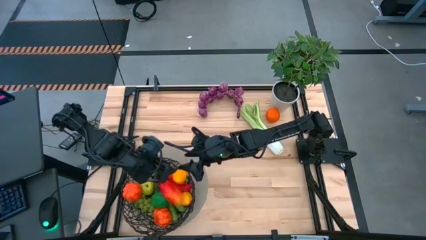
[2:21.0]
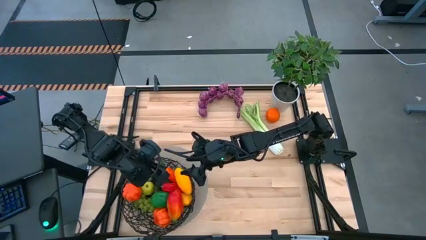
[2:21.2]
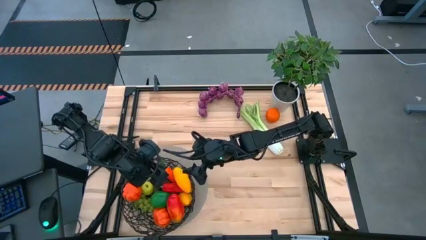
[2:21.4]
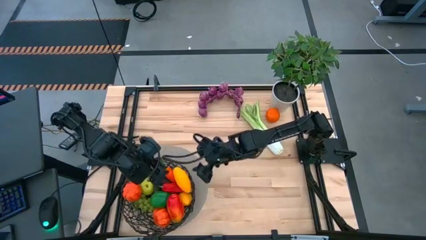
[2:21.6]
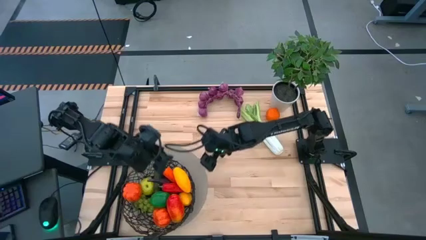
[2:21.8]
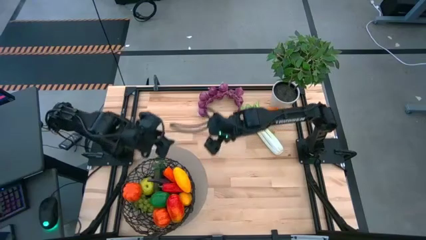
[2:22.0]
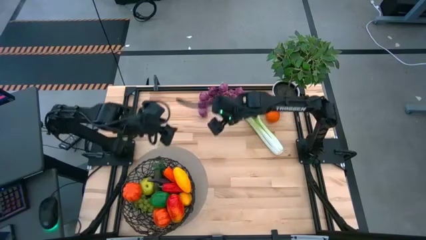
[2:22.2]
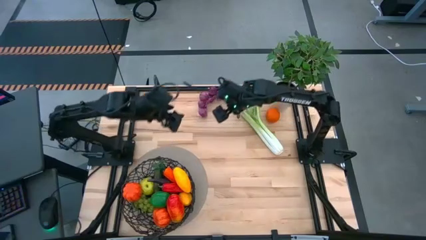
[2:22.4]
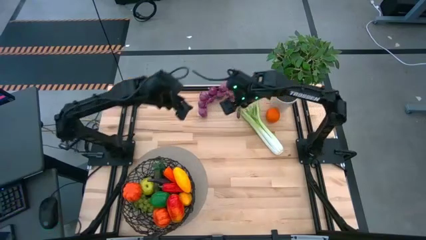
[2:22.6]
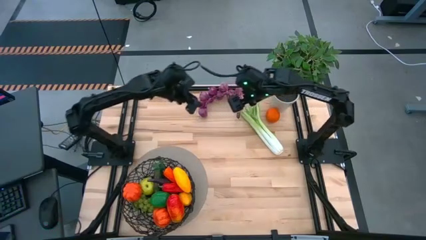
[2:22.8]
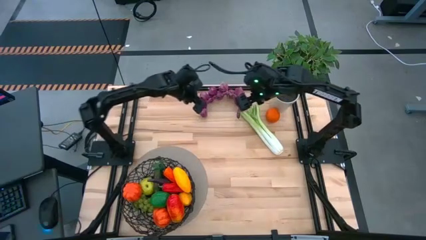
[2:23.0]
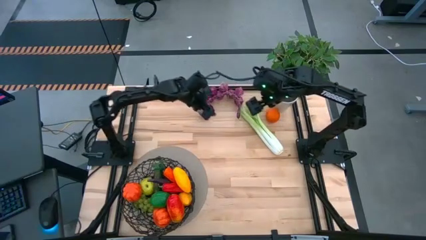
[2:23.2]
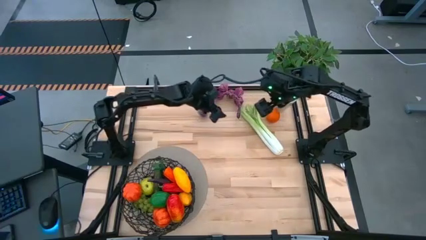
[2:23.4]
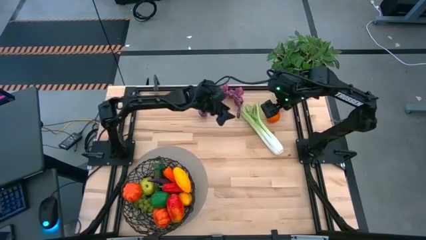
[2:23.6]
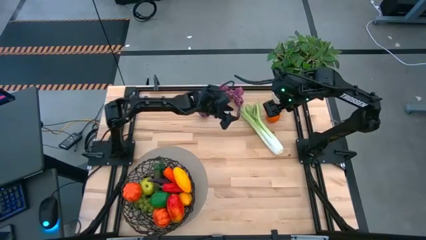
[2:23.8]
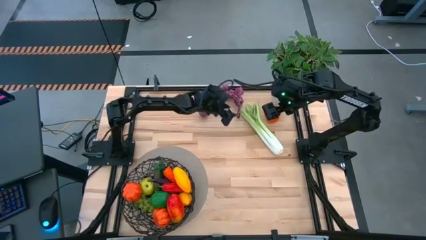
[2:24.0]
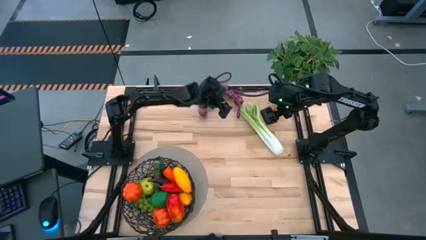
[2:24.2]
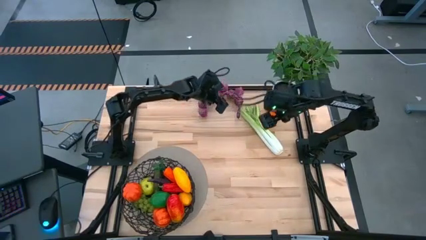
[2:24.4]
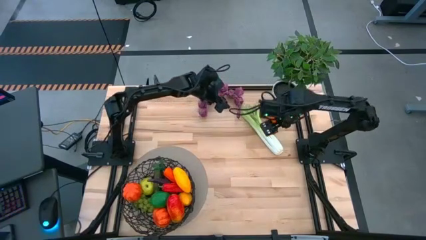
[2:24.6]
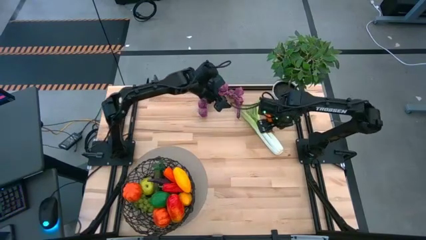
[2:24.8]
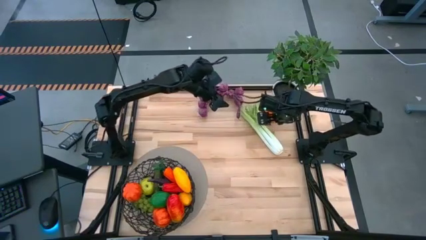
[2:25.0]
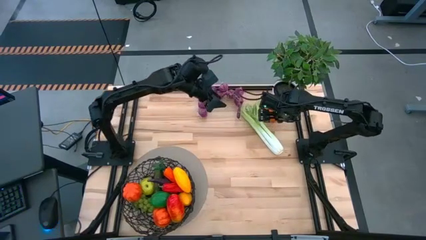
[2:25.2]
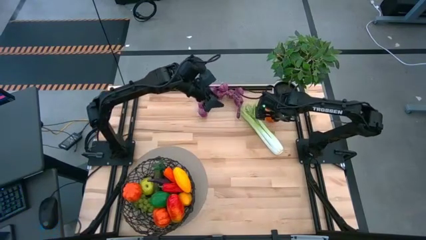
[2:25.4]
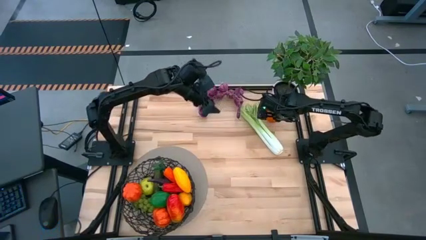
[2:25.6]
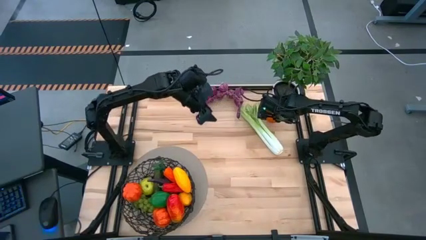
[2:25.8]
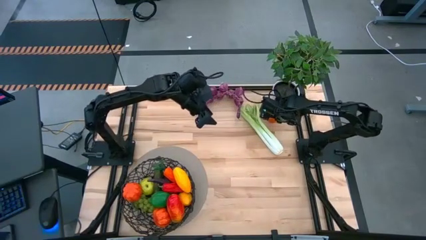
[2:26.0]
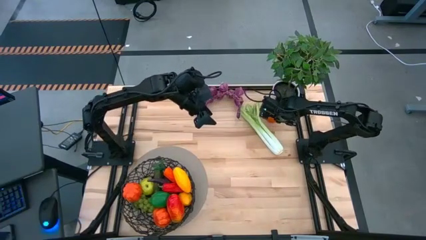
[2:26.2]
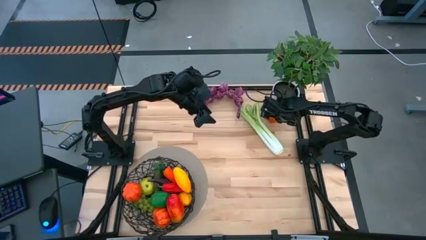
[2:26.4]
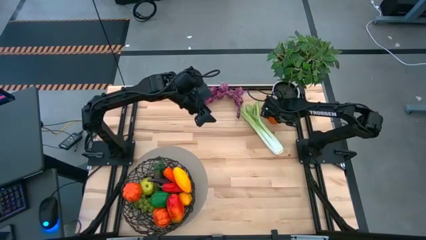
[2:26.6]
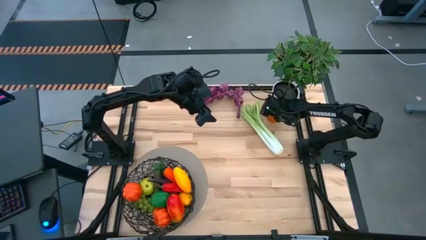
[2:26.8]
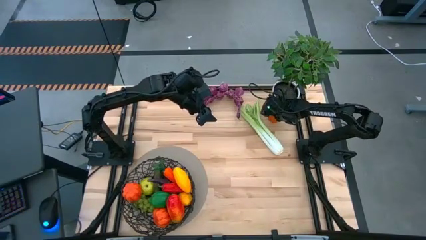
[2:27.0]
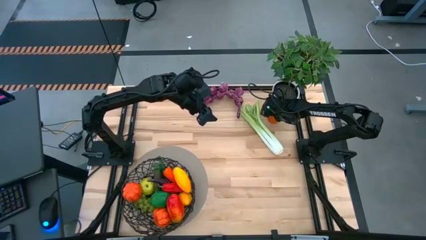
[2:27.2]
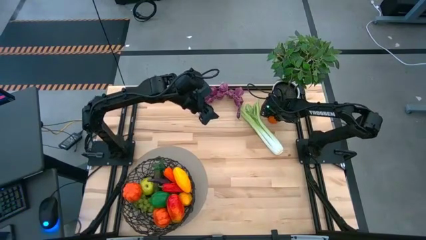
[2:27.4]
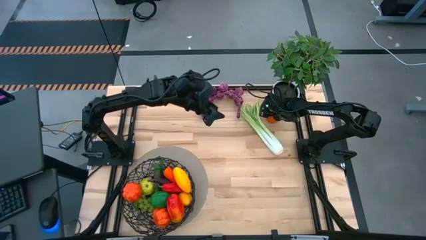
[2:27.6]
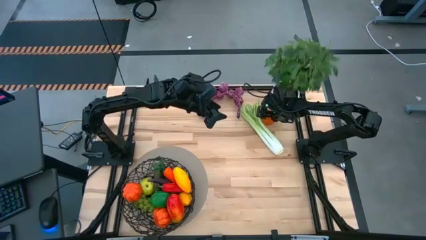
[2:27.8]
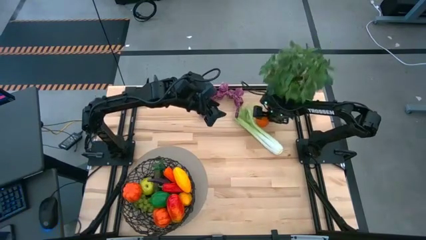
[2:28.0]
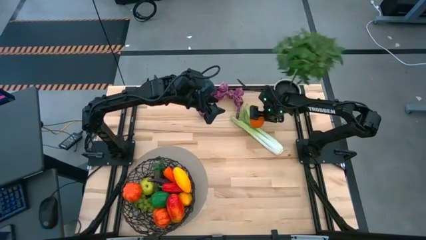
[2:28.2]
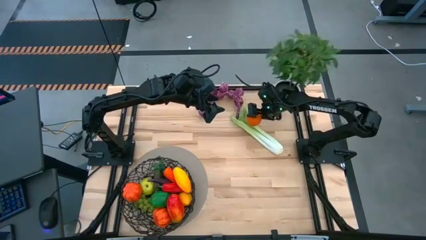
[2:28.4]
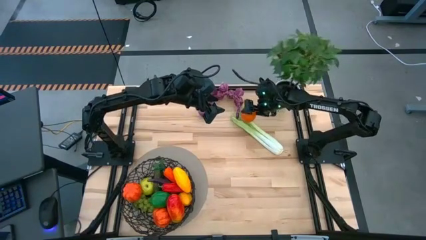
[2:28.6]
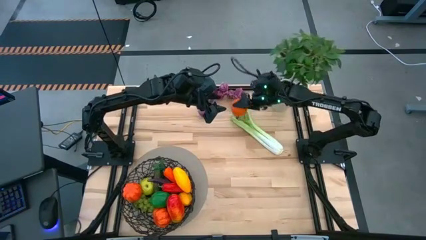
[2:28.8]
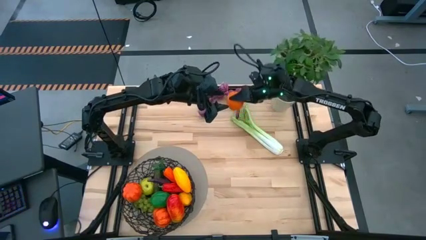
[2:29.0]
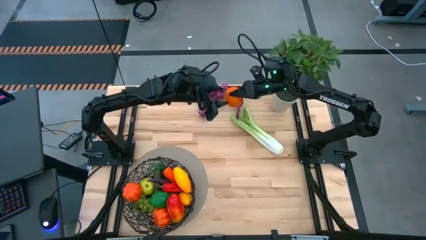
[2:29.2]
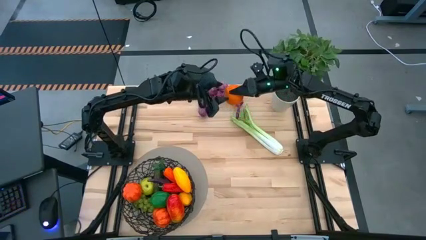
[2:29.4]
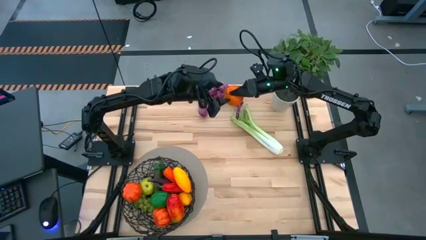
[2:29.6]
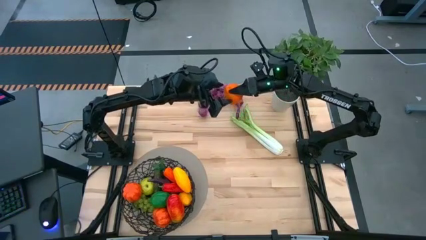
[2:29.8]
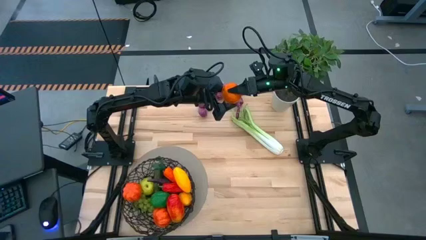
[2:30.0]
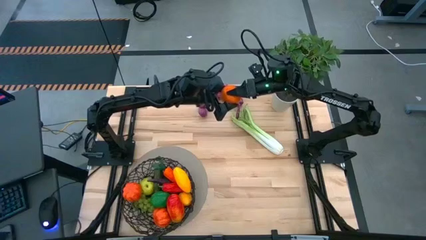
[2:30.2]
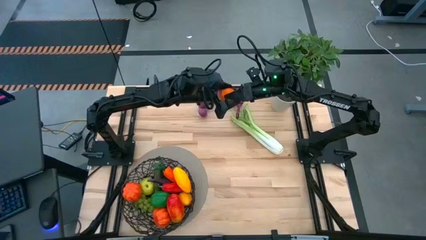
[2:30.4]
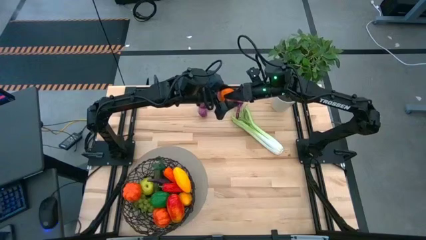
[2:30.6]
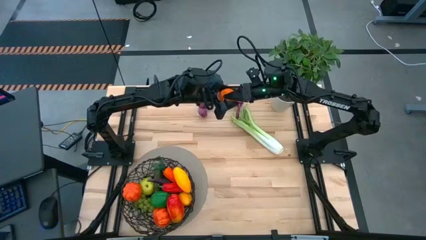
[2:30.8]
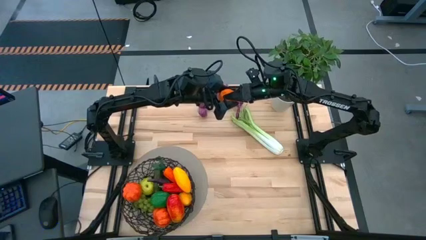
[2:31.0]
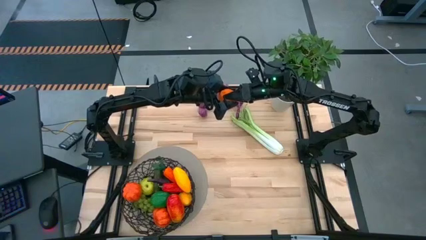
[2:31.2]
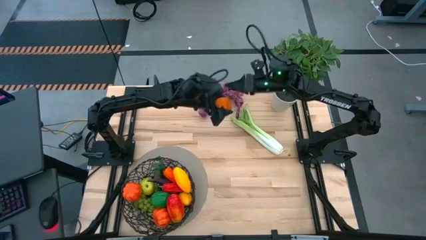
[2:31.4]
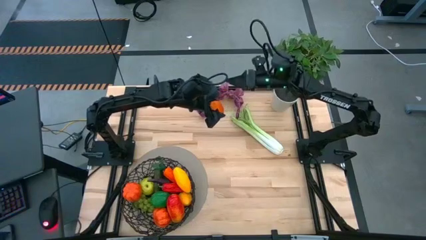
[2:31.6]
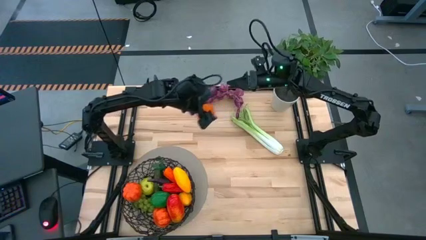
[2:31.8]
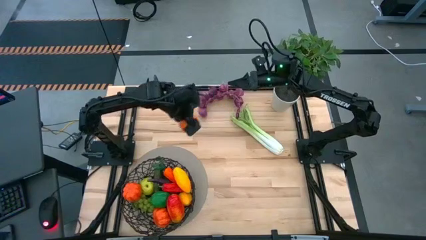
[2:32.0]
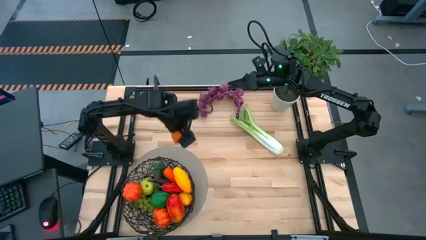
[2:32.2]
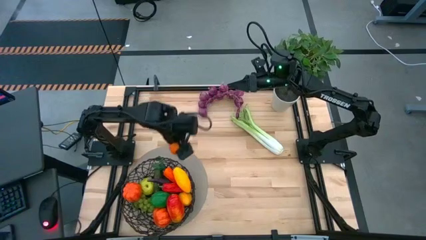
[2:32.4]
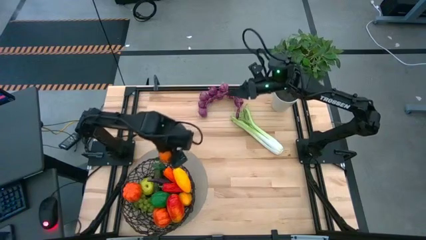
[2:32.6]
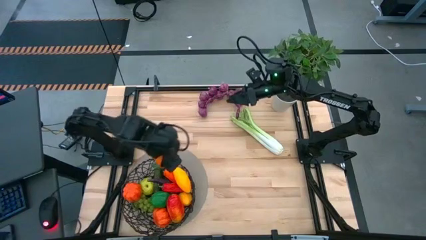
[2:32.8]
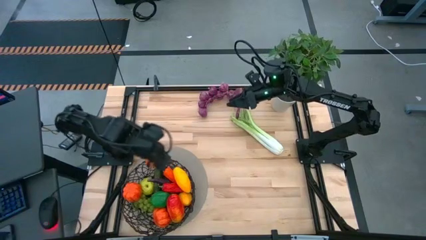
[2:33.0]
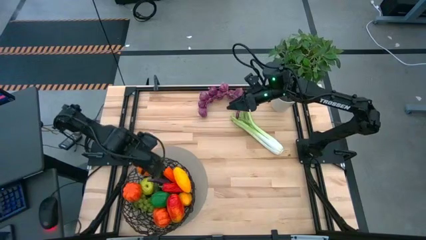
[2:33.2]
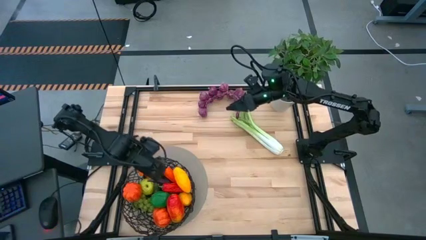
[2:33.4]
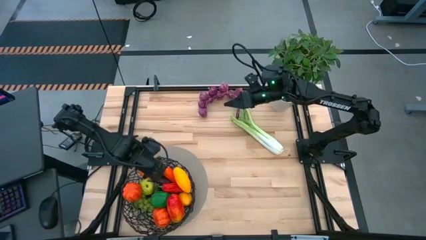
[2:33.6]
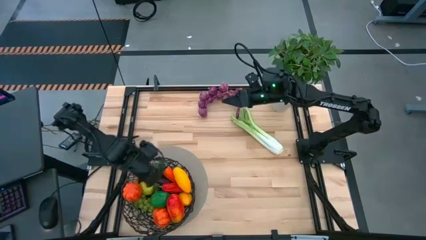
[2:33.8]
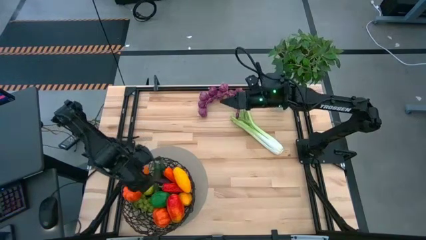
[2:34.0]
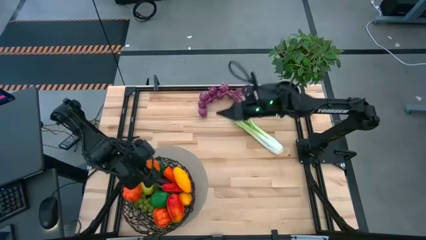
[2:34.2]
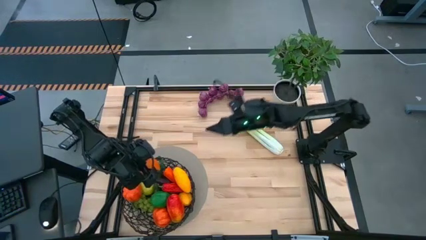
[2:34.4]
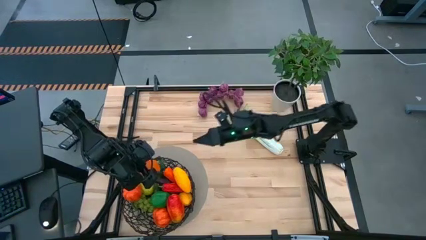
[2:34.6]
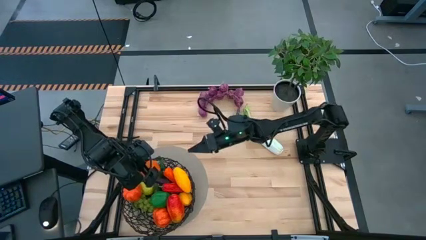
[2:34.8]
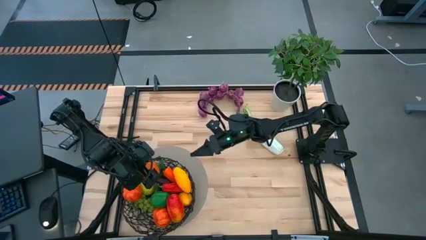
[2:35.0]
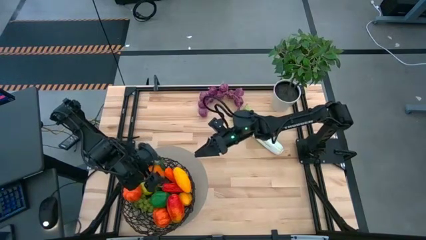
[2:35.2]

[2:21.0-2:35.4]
Task: Build produce basket
Put the orange into the black basket
